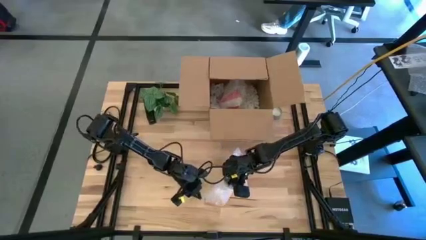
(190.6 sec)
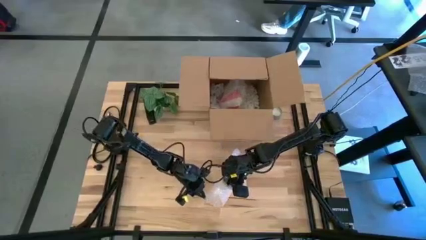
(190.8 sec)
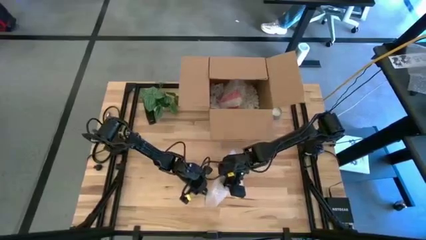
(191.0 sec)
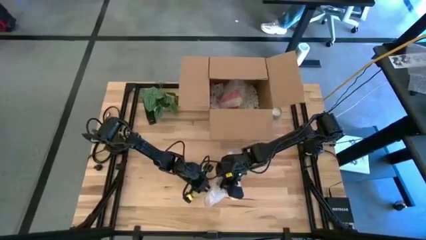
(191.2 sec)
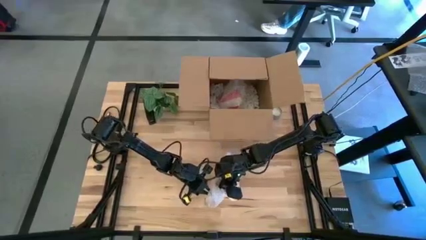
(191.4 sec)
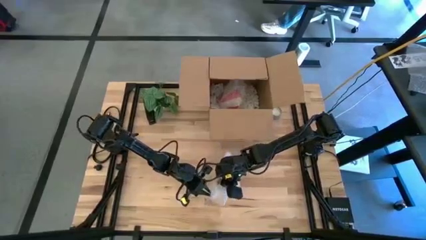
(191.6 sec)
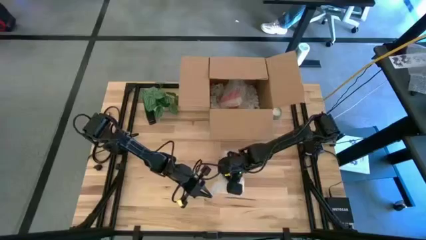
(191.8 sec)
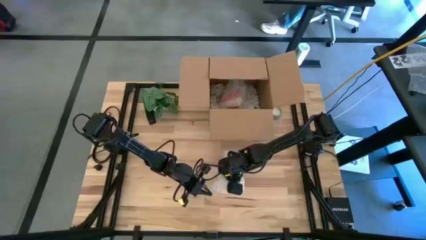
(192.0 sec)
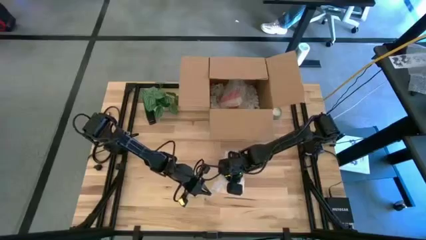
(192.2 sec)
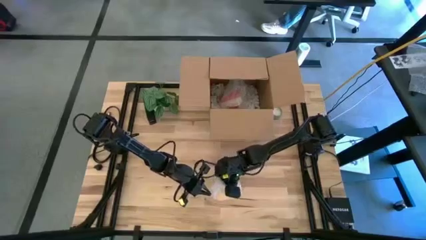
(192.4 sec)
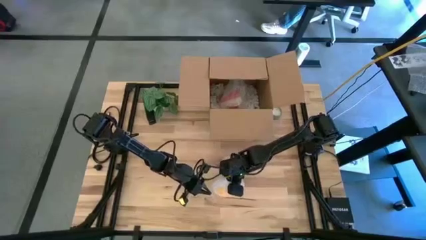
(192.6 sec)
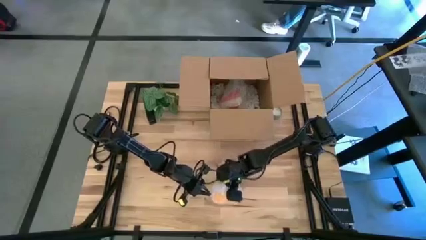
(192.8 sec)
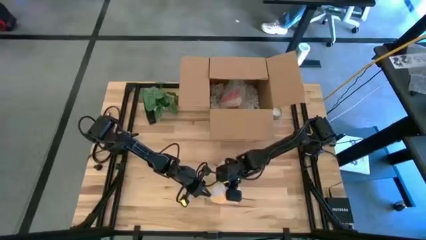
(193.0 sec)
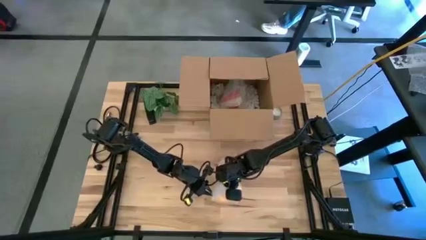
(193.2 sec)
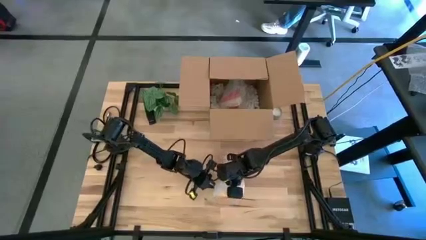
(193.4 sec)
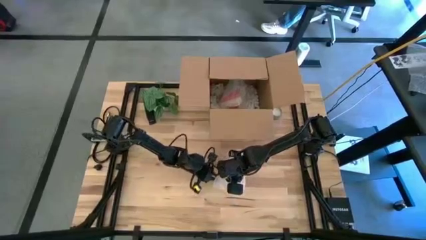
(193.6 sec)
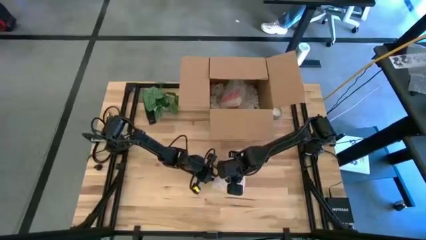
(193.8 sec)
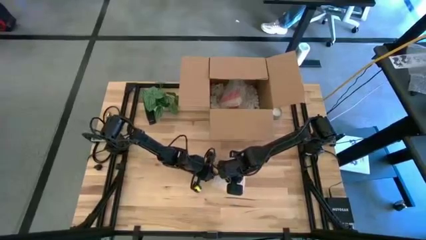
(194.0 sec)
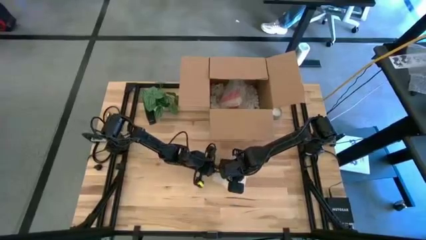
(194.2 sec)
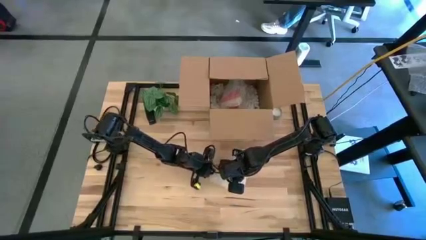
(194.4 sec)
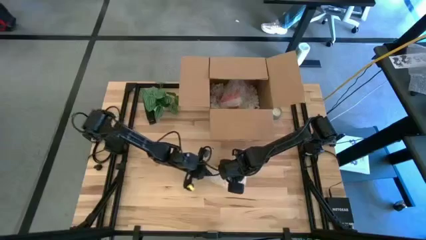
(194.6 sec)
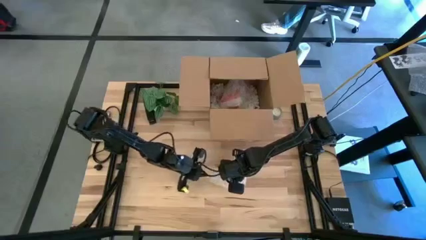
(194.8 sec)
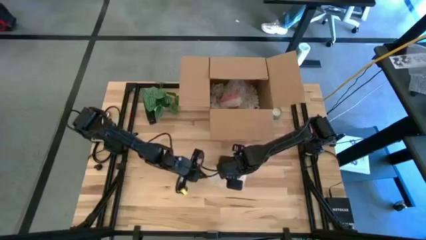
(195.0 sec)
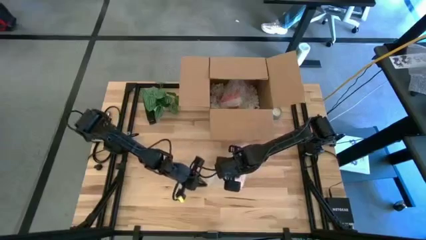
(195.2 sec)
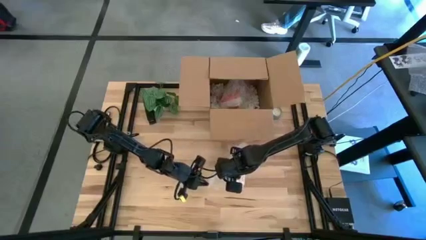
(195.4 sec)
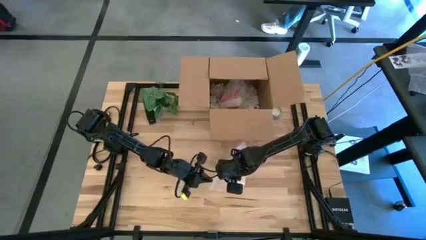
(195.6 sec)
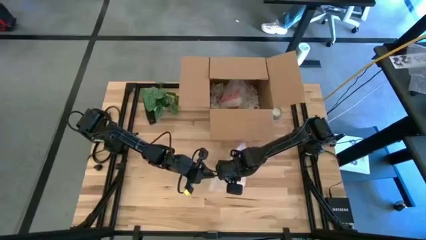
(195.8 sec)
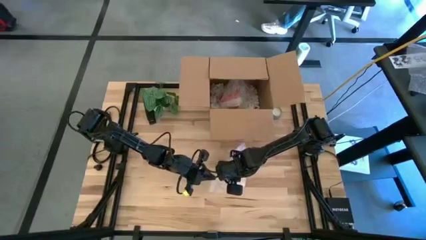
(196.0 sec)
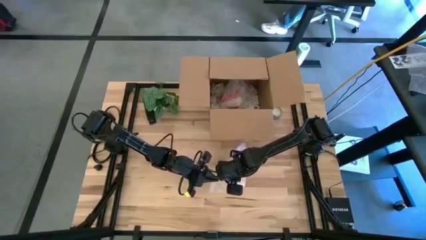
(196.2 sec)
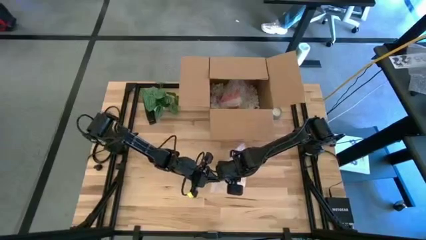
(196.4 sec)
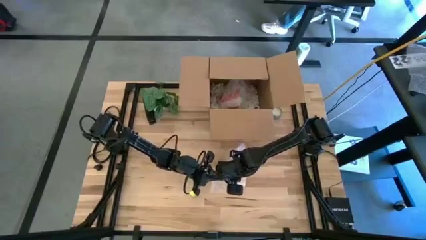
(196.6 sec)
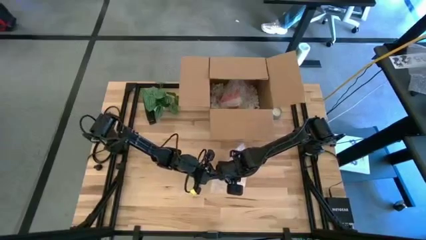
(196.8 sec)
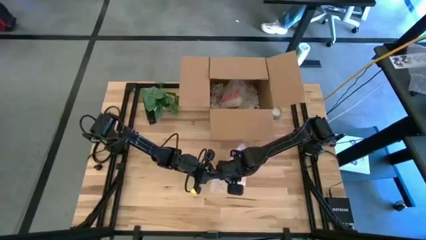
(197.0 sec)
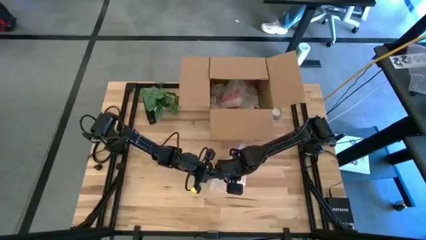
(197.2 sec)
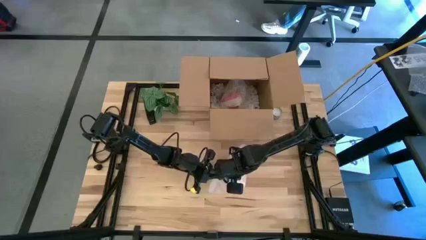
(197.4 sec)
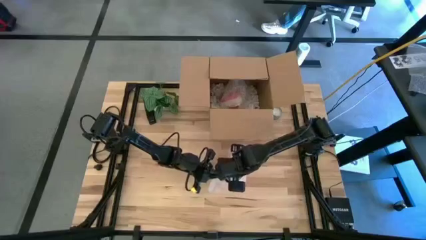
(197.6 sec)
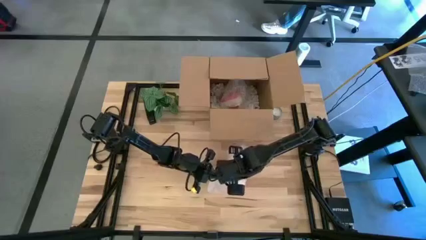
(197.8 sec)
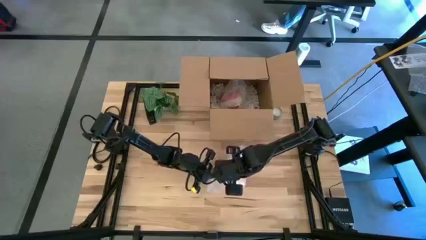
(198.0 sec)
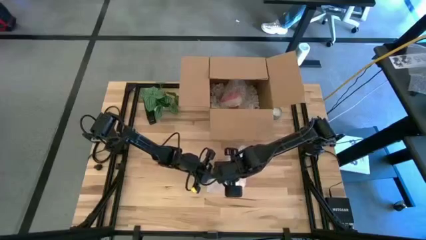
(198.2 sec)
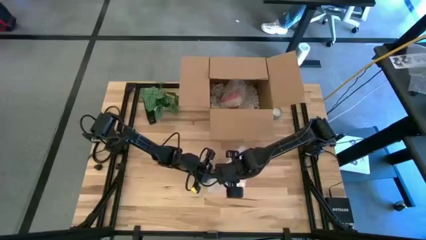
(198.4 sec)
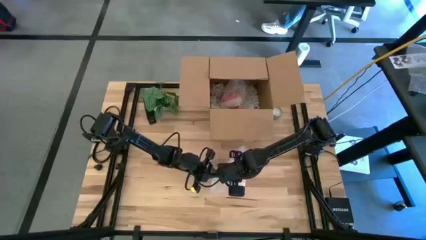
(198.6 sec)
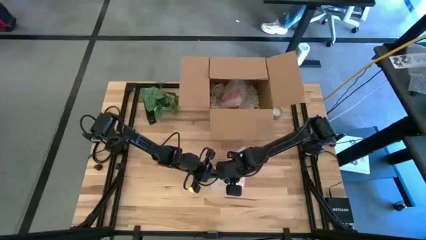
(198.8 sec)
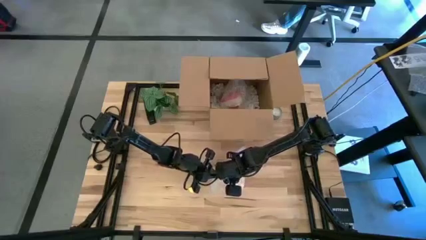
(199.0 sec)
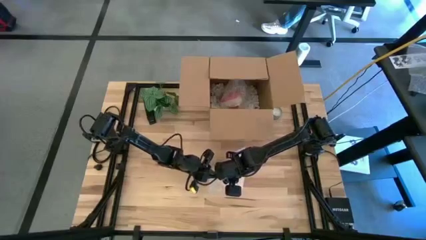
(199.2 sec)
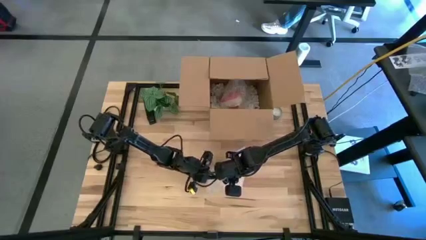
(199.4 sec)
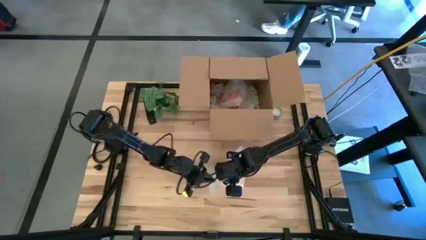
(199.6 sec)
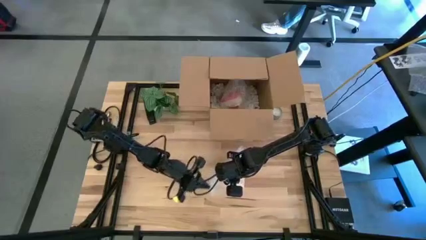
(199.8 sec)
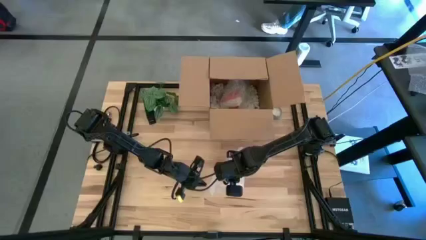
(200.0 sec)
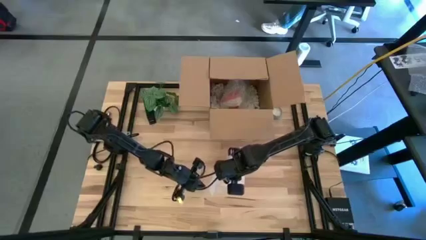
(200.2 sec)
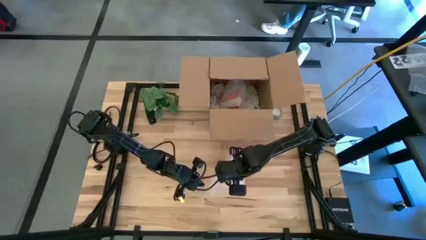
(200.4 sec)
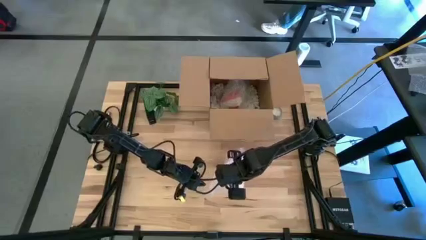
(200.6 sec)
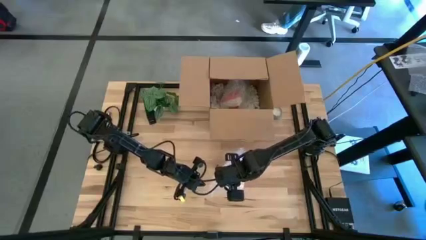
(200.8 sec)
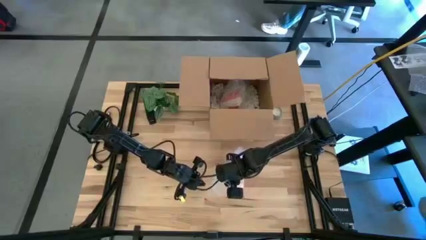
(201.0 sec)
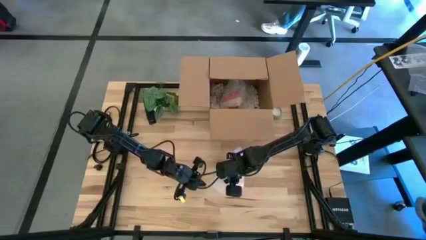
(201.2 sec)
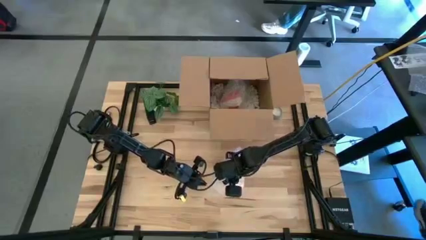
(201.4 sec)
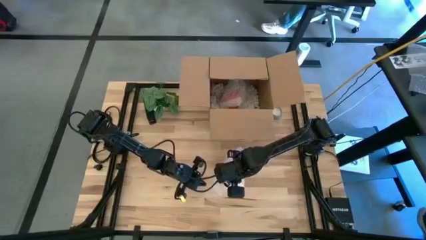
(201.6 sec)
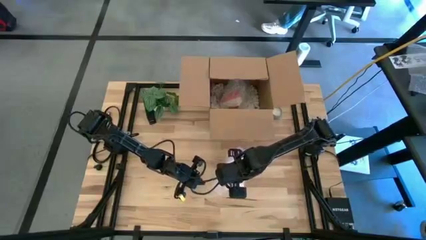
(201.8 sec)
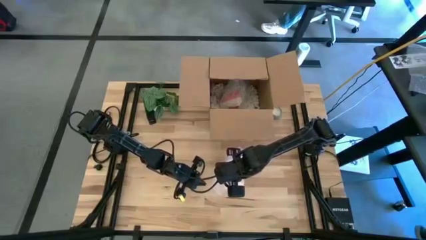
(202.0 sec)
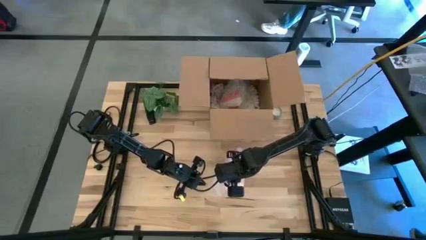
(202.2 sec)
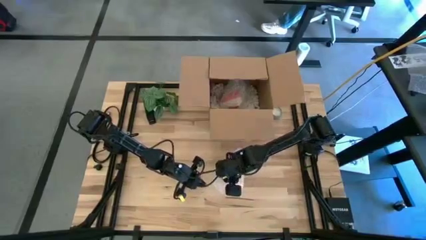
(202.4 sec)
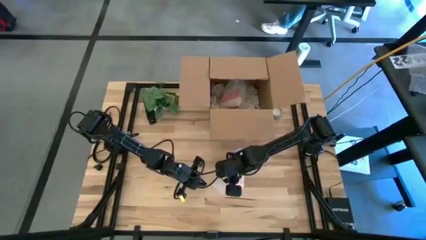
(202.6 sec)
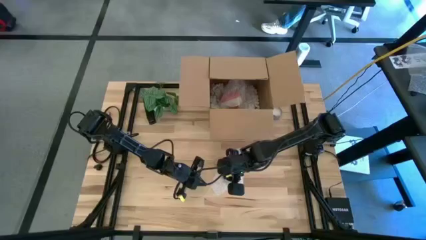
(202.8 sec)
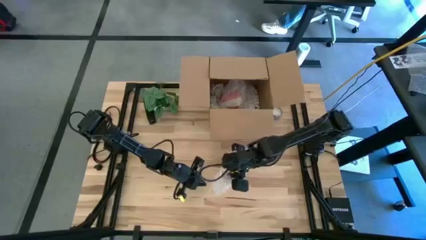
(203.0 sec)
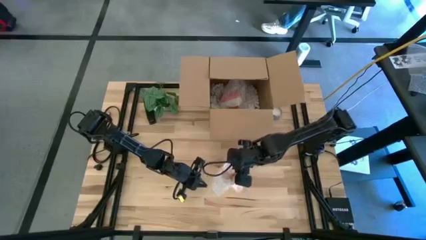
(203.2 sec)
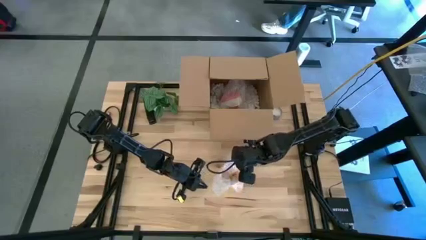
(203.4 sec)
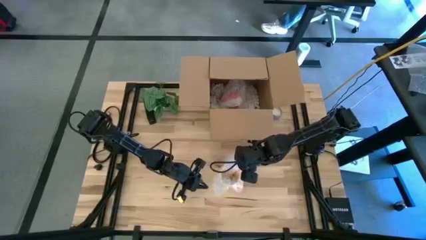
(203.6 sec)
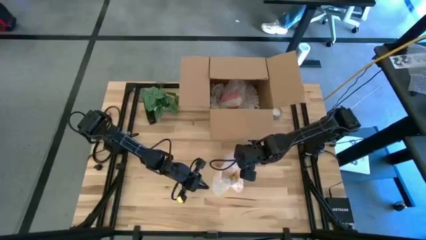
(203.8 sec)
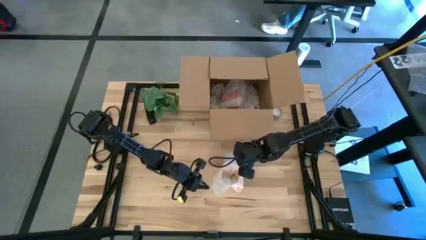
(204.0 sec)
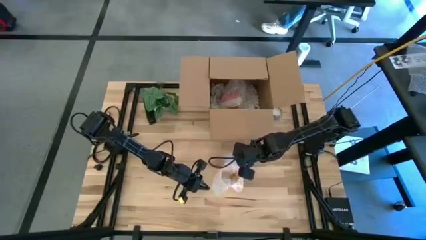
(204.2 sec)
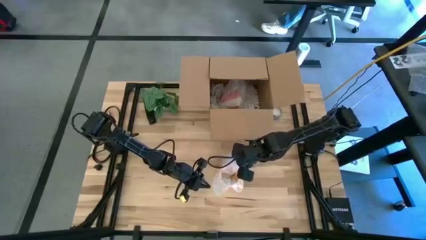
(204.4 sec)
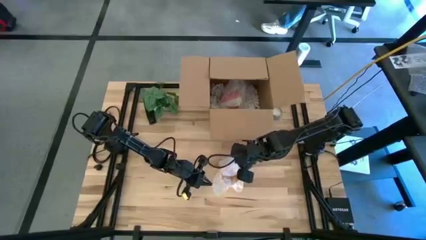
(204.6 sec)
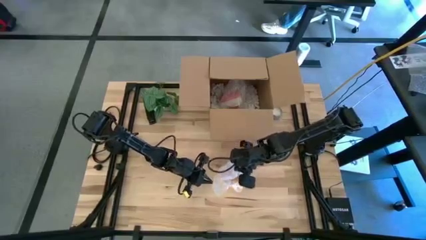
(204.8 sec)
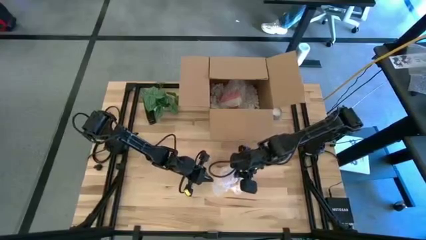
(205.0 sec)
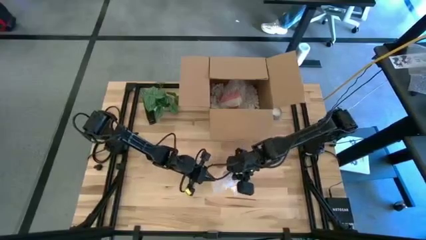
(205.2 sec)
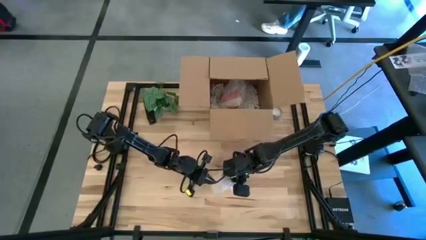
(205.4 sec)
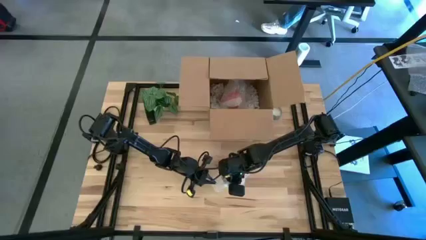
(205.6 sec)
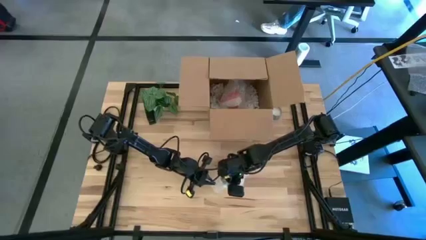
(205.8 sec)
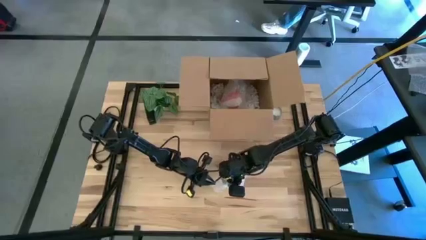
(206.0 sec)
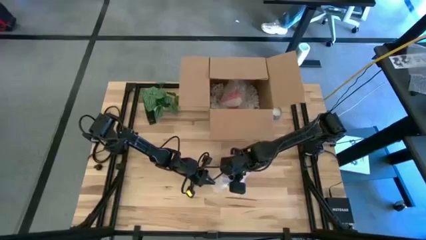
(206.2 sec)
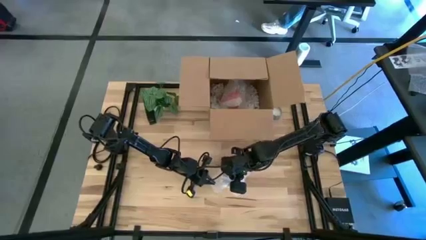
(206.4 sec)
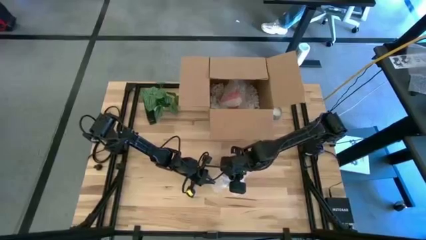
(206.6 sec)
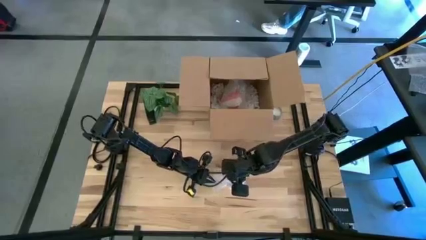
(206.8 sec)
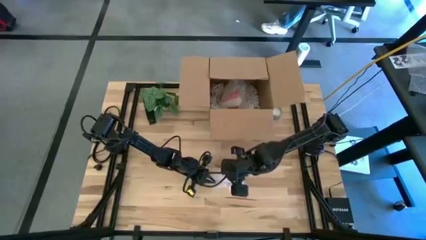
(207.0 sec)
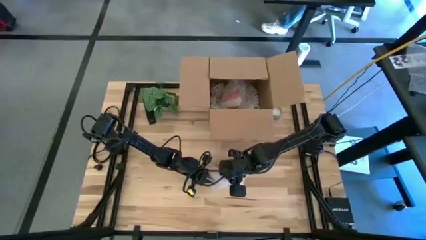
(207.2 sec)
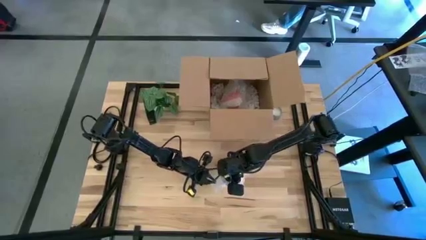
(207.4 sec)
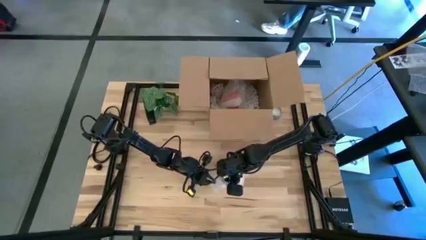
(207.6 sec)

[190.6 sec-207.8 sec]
Task: wrap mug
Wrap the yellow mug with the bubble wrap
